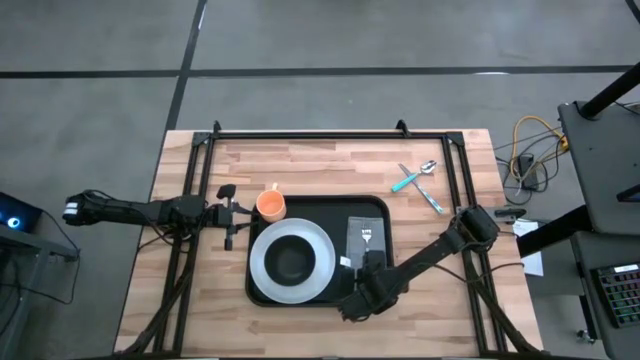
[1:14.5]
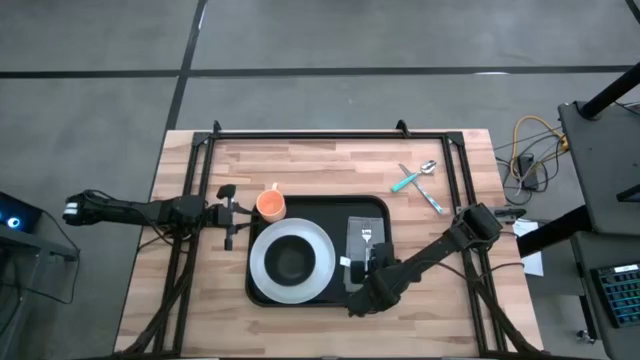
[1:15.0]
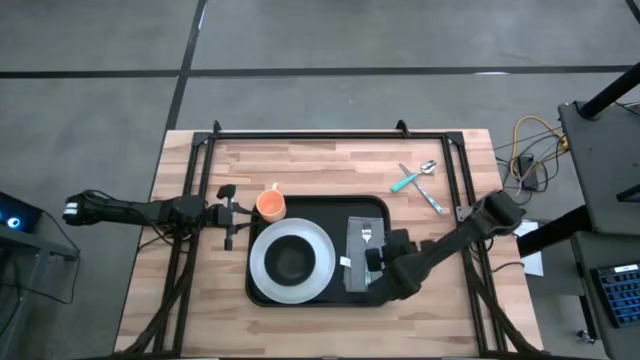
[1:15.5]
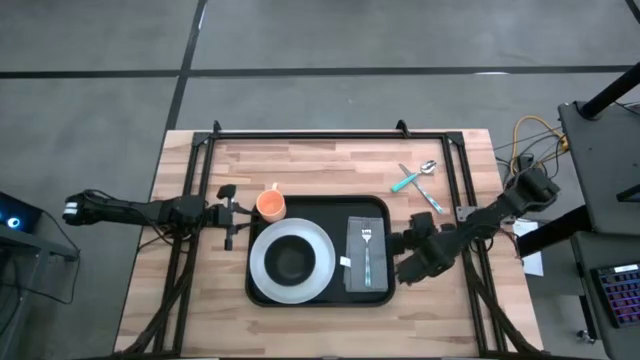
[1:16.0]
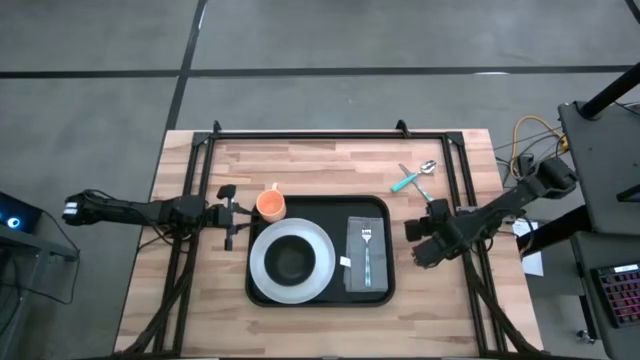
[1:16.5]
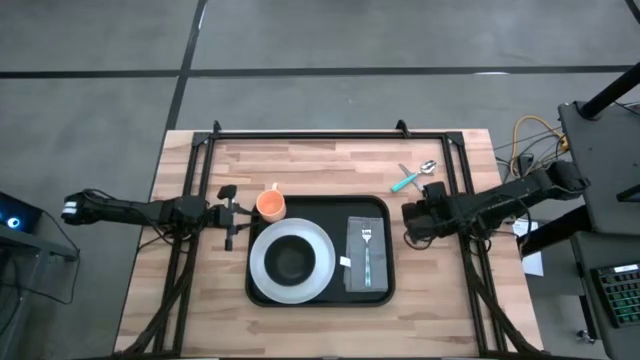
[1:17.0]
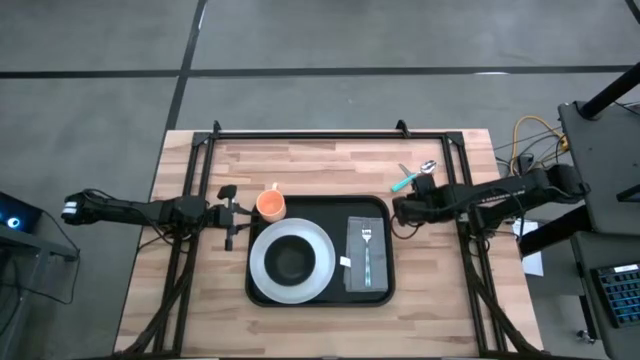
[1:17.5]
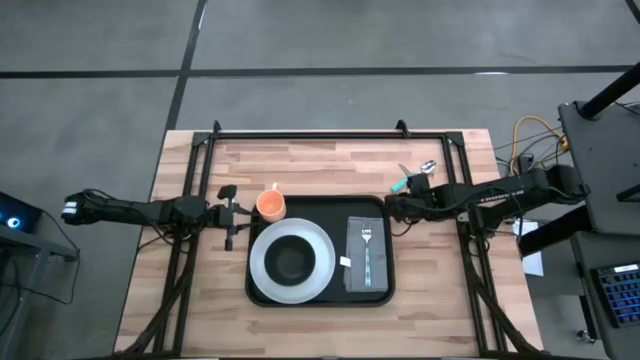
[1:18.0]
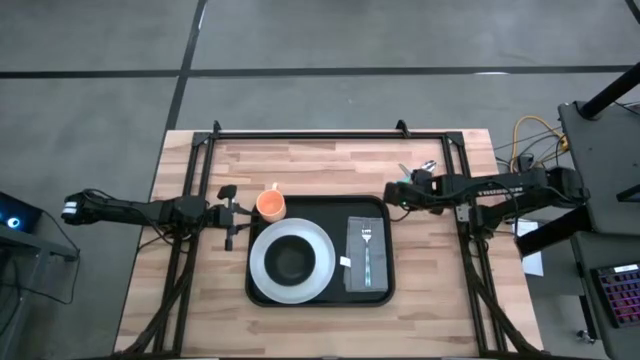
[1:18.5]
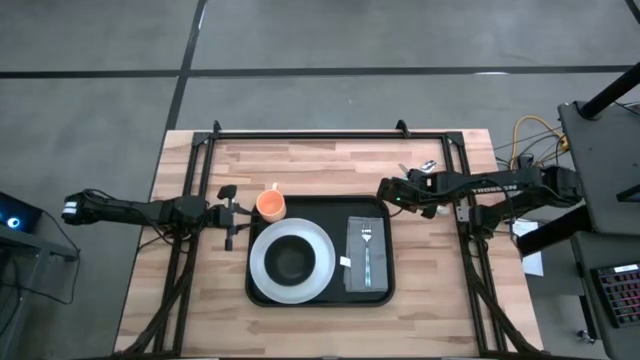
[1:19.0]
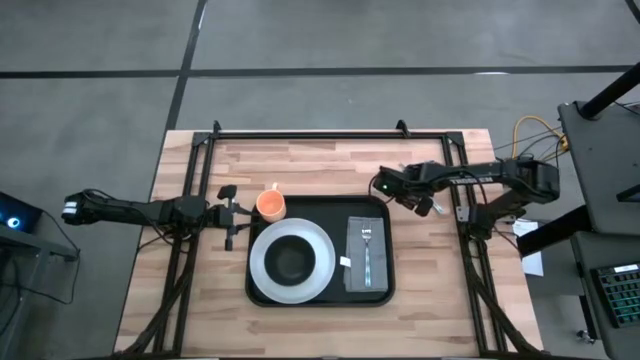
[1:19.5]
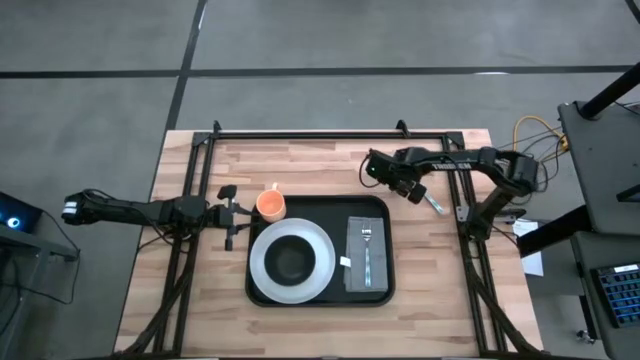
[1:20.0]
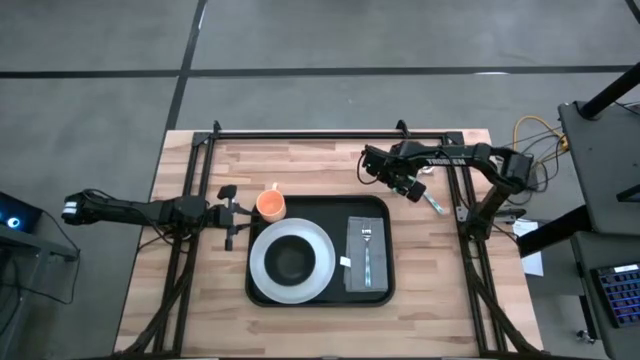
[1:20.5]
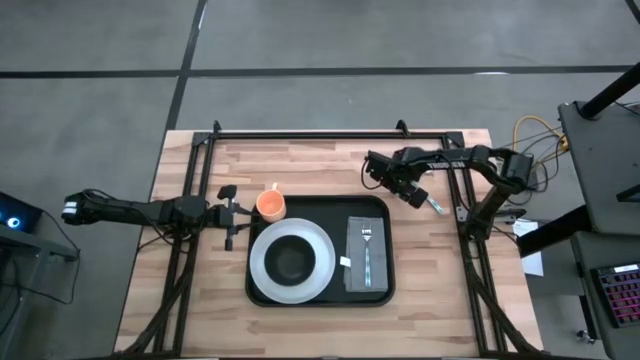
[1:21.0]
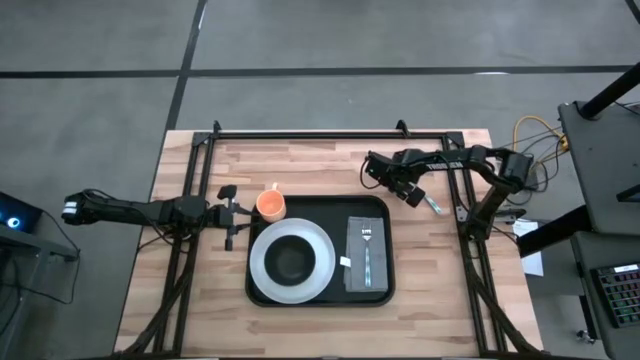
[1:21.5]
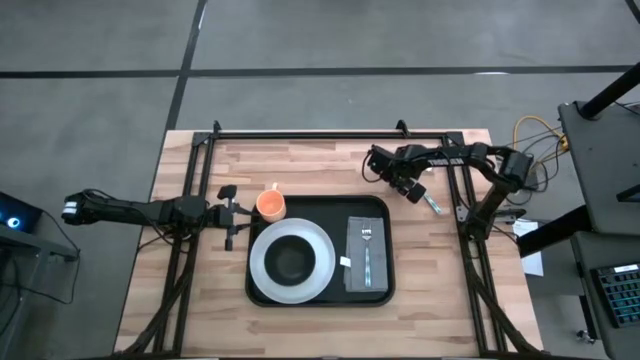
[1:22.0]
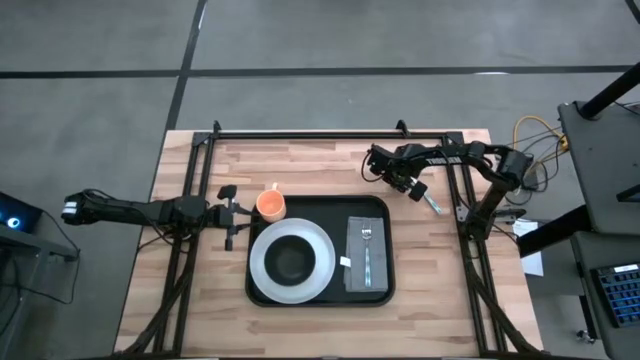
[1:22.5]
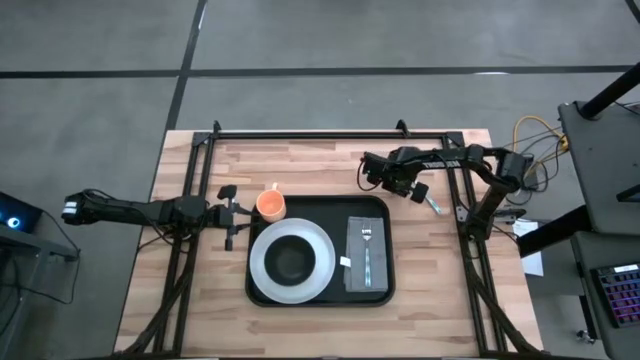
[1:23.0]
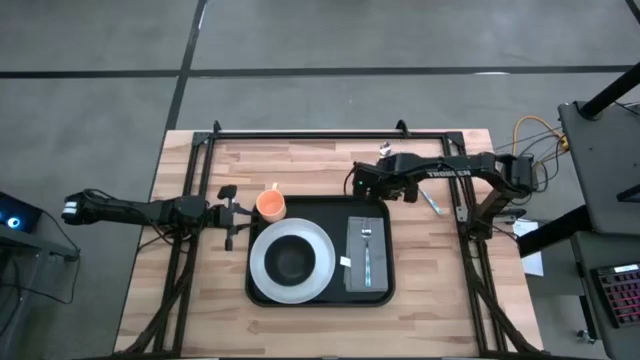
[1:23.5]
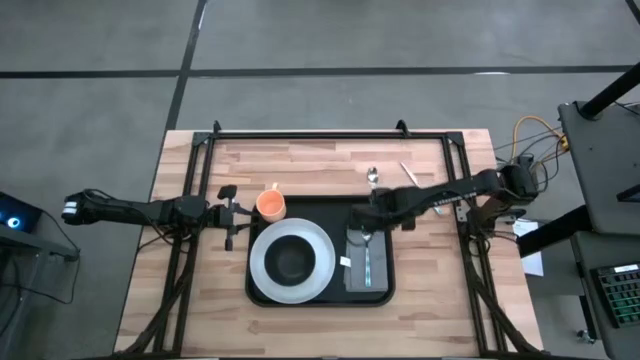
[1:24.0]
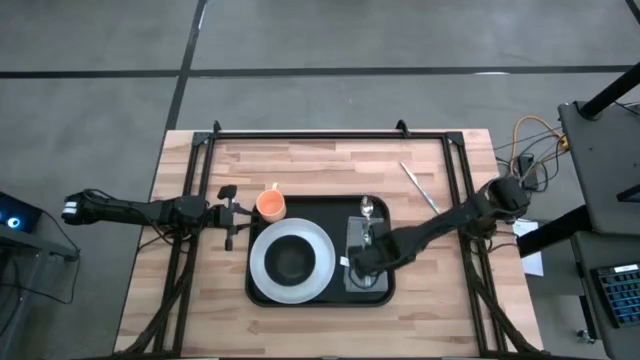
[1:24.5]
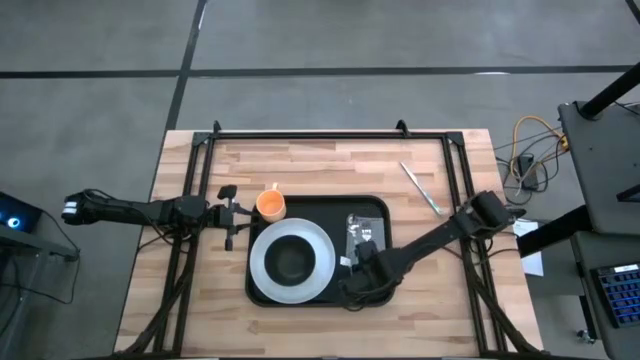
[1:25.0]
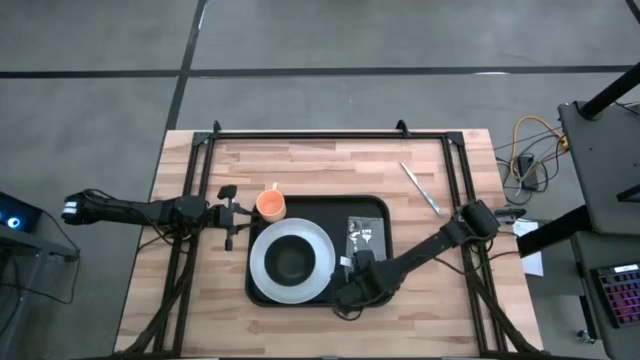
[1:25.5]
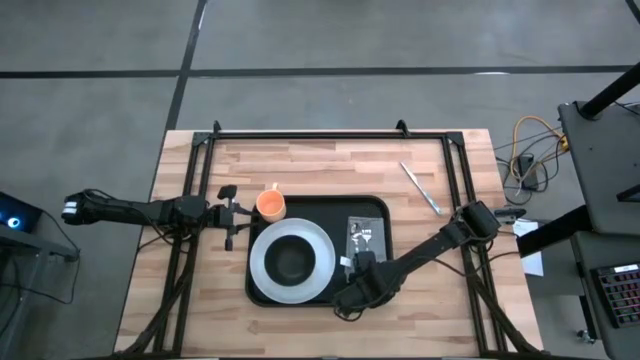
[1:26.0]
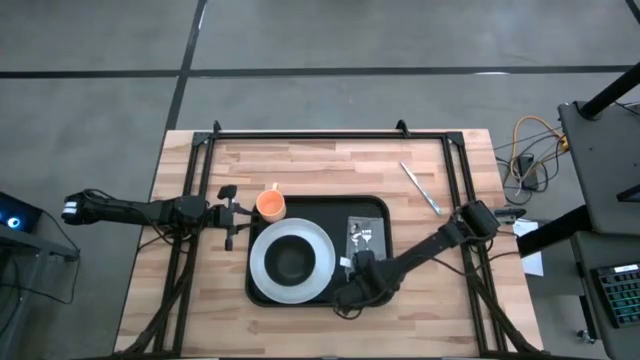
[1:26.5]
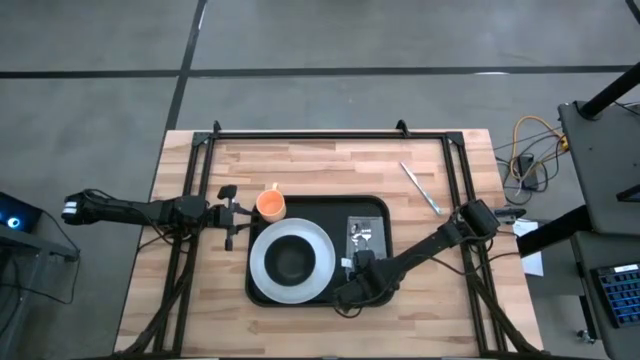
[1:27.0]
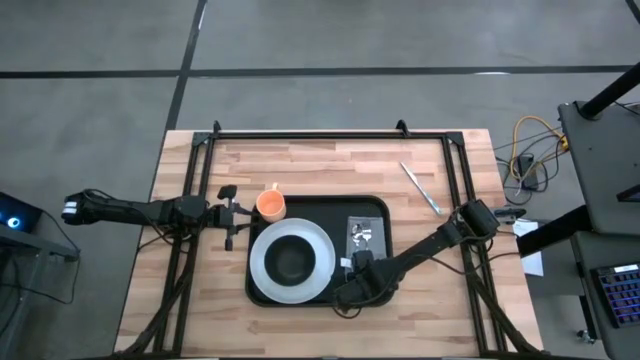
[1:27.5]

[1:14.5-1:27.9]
Task: Set up tray
Put the blue spoon on the left side of the gray napkin

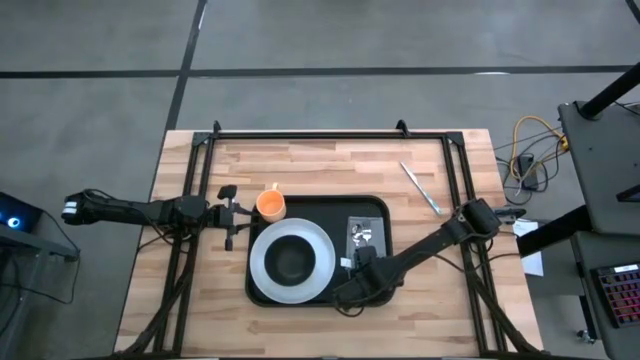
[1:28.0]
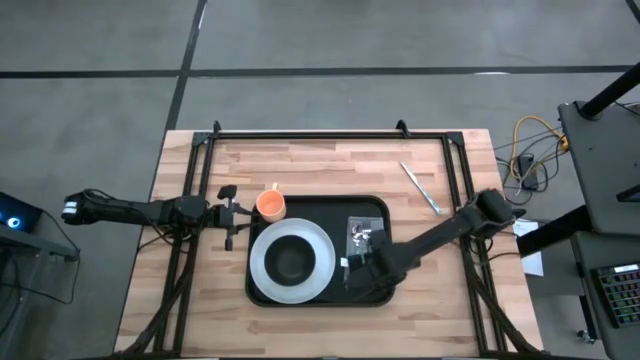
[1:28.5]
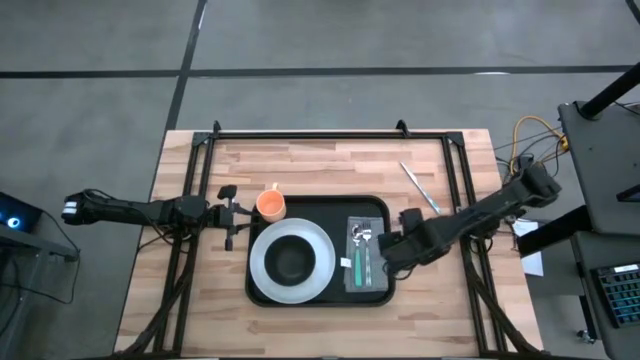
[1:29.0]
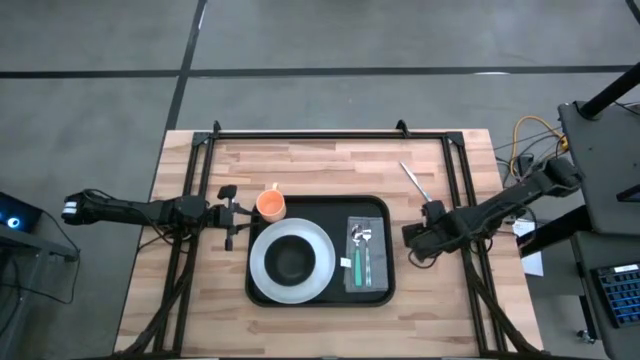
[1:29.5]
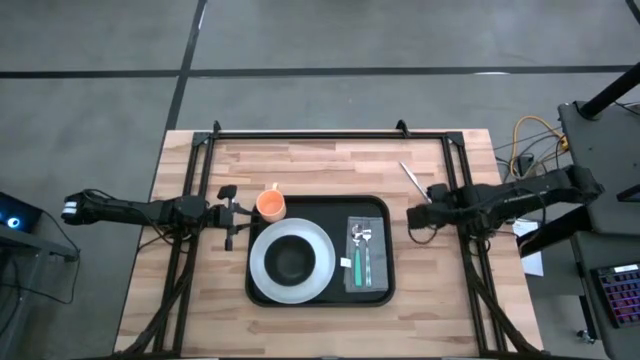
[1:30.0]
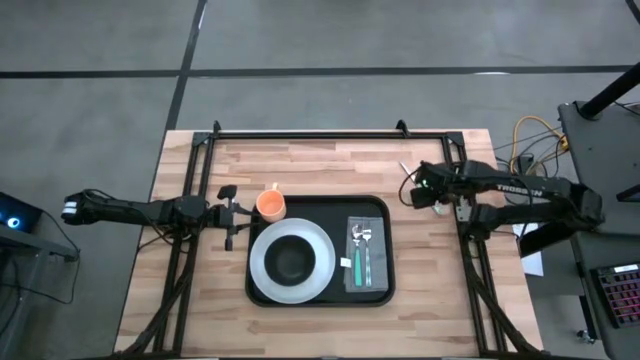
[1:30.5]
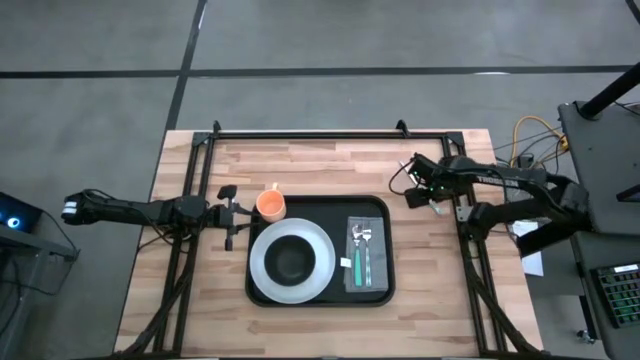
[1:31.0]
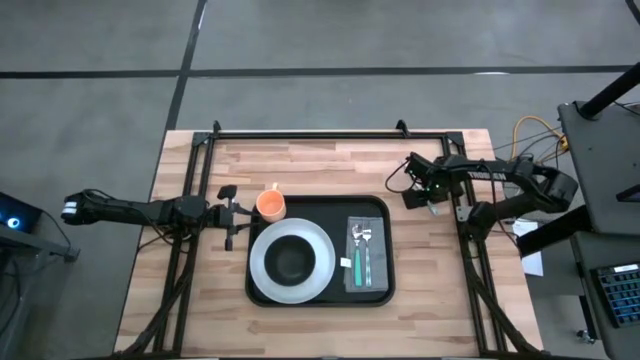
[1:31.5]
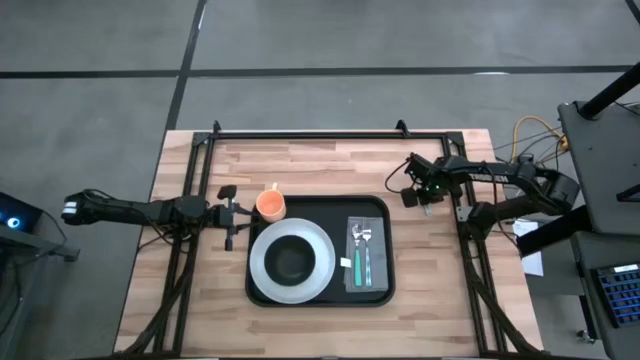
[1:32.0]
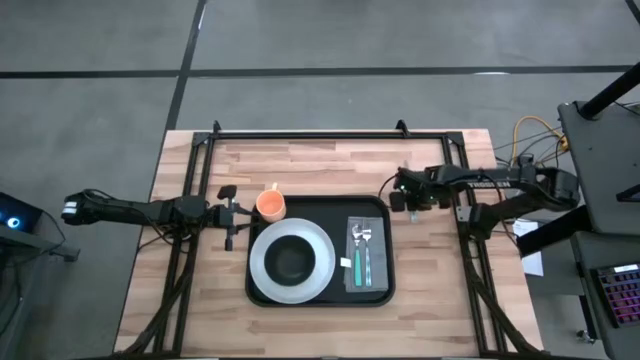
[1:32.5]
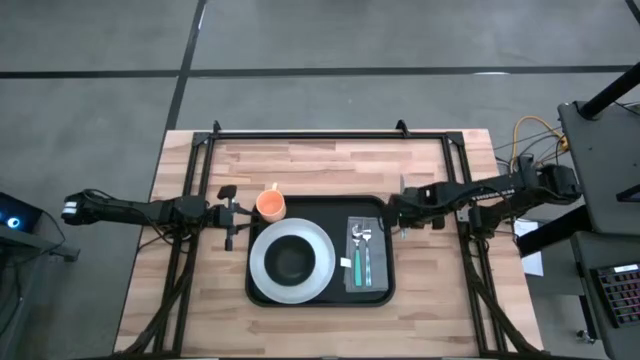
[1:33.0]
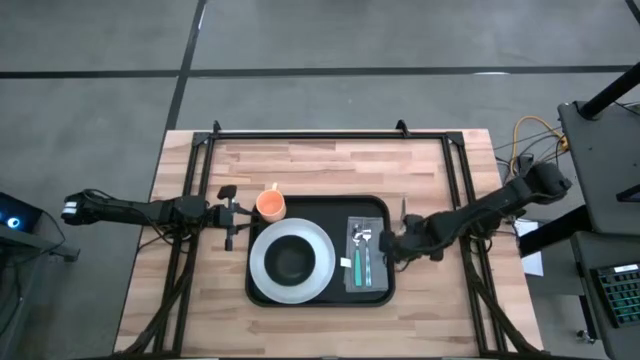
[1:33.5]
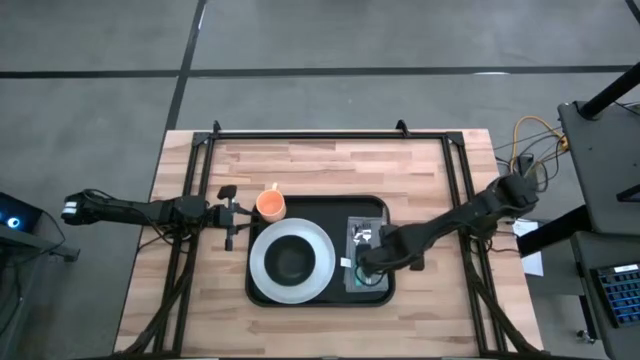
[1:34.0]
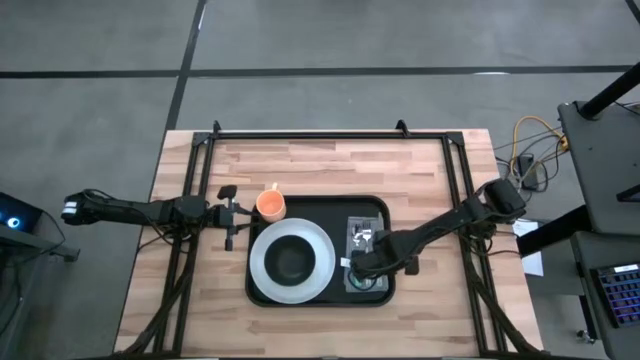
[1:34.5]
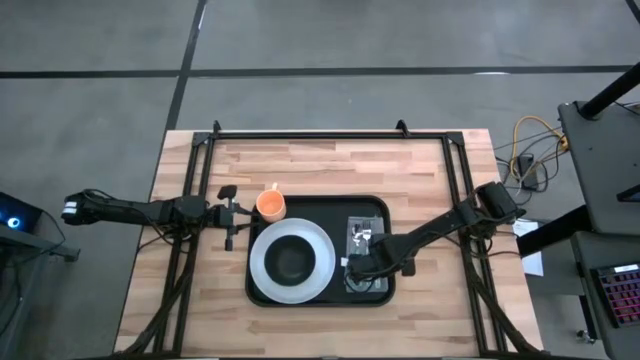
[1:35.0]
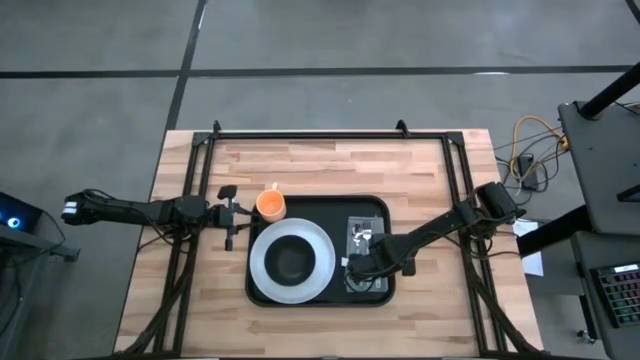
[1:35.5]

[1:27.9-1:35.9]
Put the blue knife on the right side of the gray napkin
